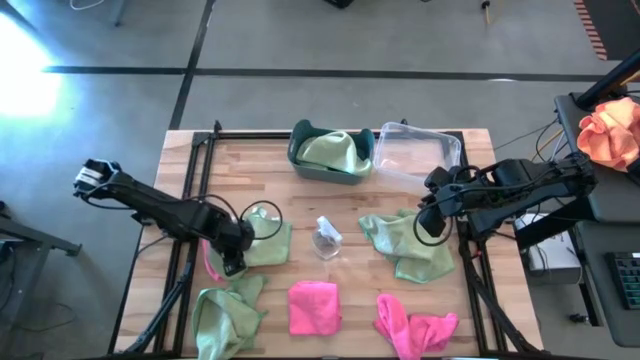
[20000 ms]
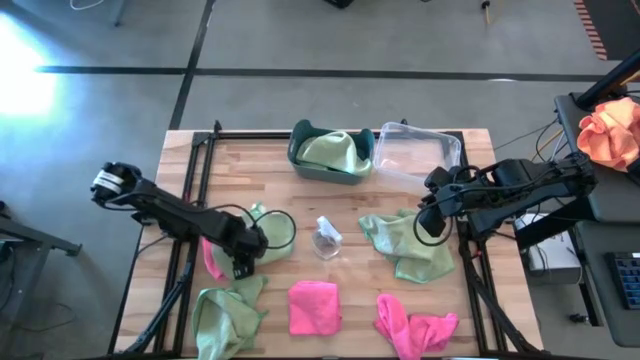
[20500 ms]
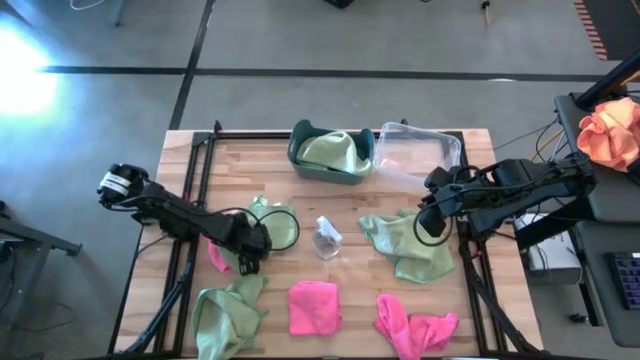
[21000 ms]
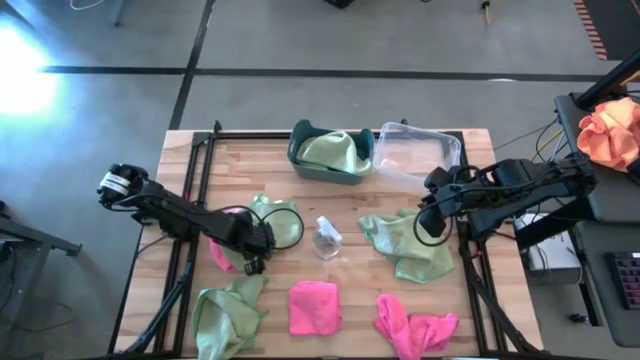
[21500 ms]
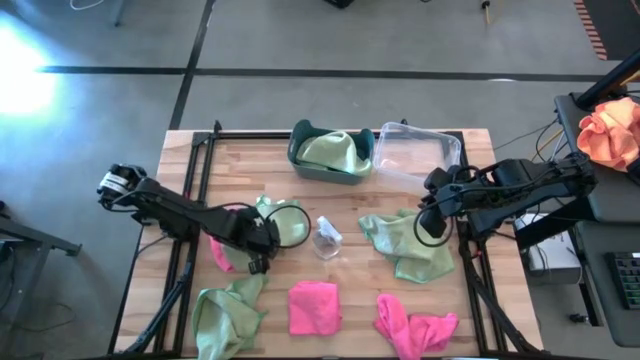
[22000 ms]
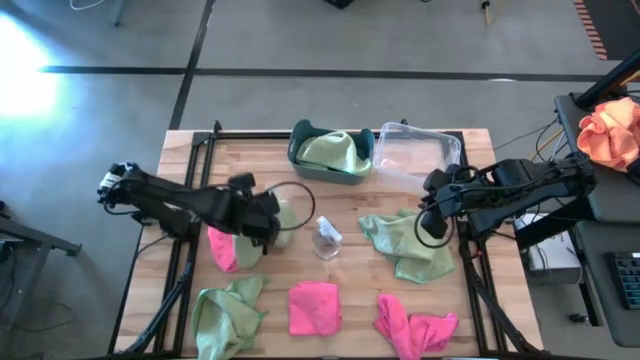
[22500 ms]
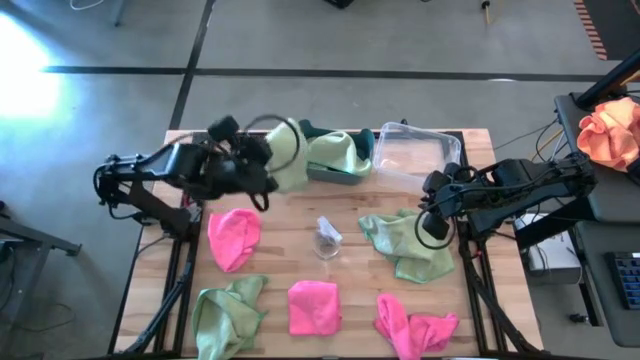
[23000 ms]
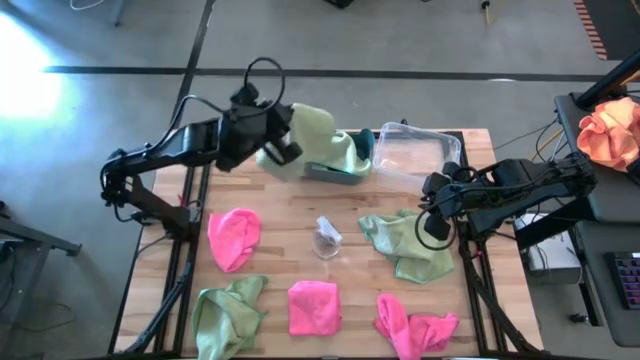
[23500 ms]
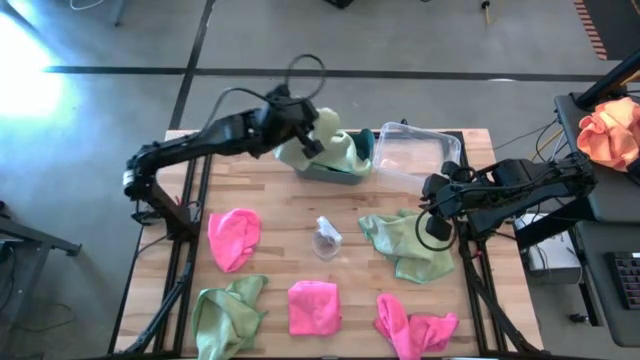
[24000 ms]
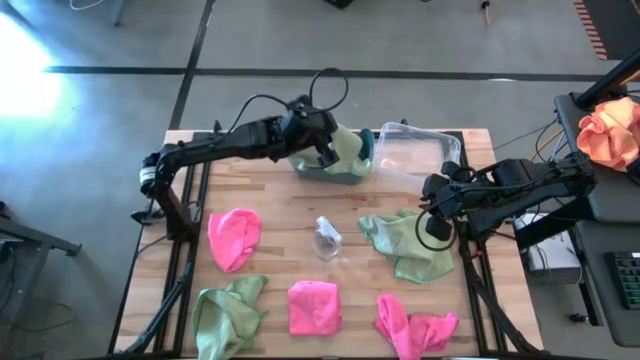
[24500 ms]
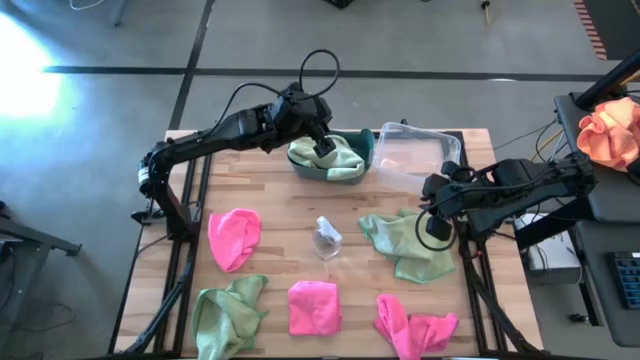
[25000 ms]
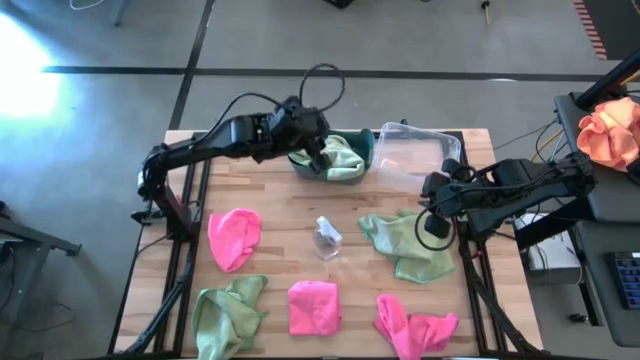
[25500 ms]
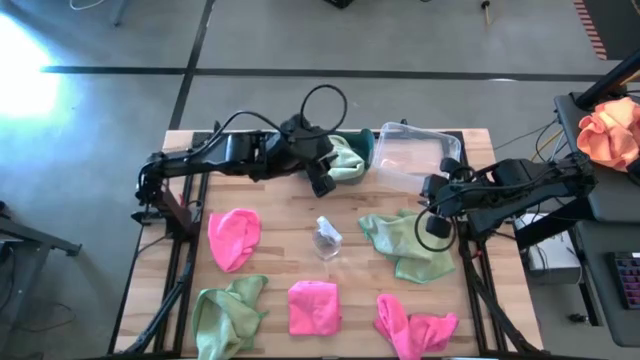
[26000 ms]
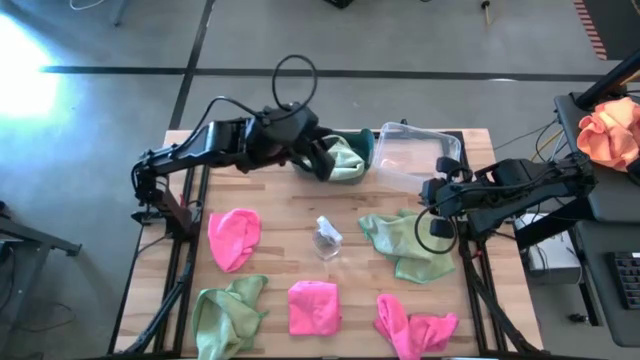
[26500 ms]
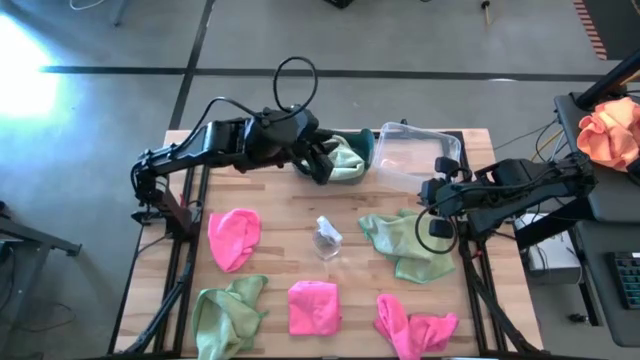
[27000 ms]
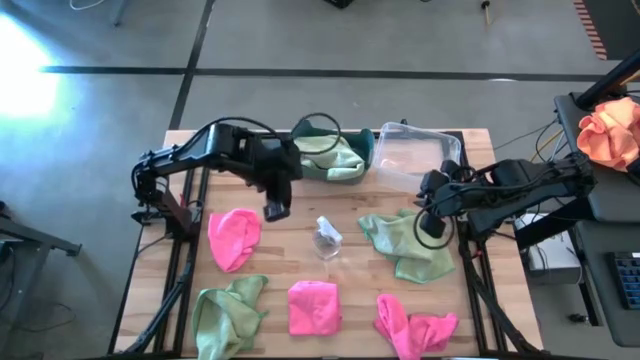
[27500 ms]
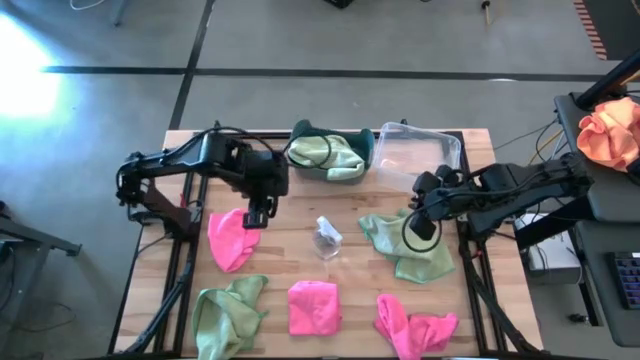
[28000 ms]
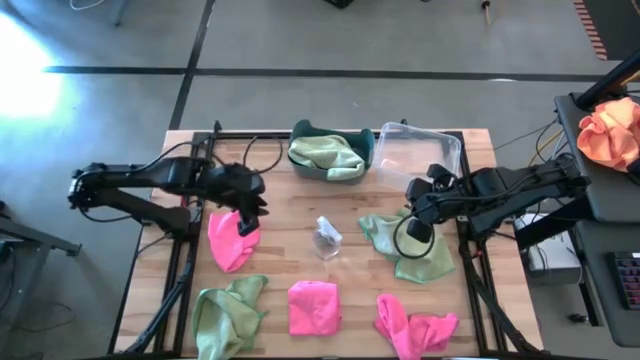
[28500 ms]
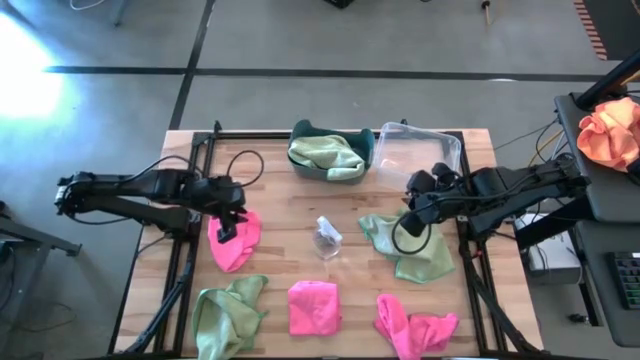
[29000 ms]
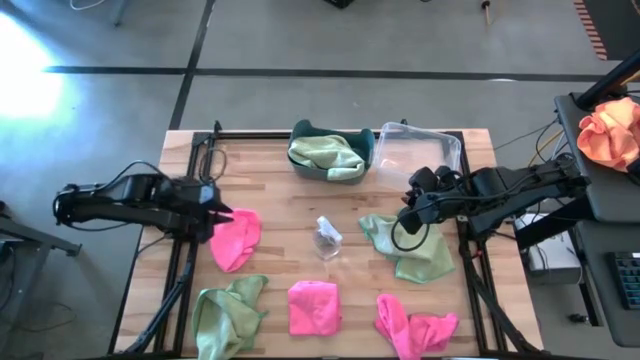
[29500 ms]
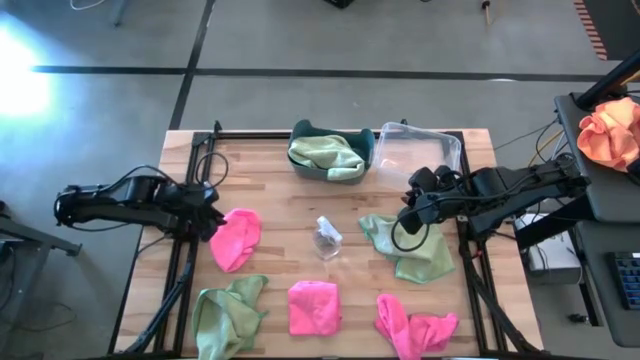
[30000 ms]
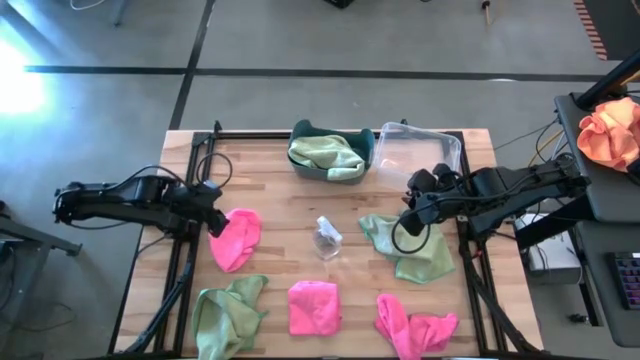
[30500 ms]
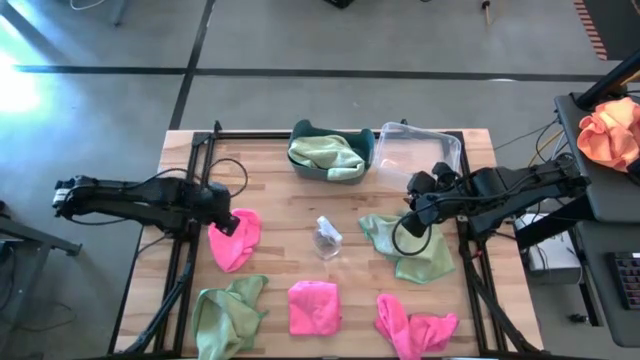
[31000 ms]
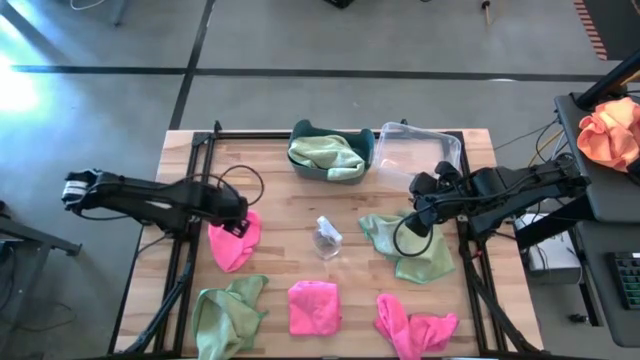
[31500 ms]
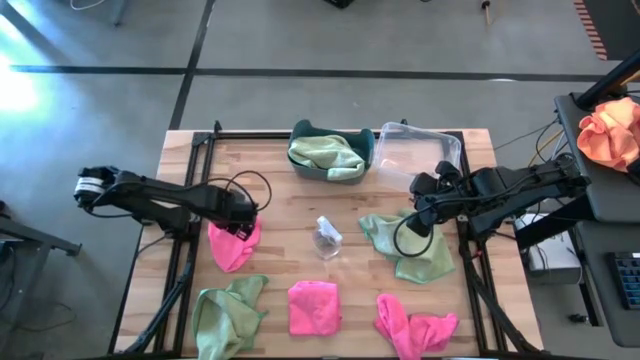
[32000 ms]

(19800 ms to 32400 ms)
Task: Sort microfiber towel by color & place in baskets
Put the top left green microfiber cloth into the blue bin

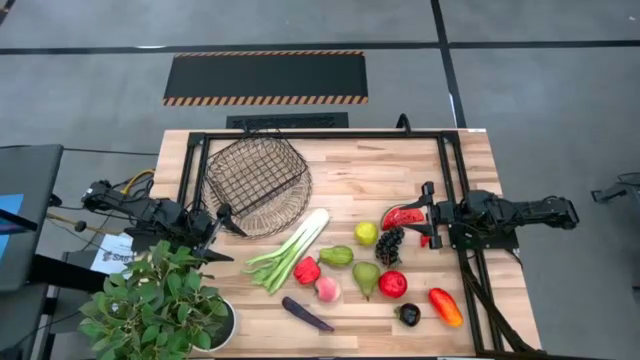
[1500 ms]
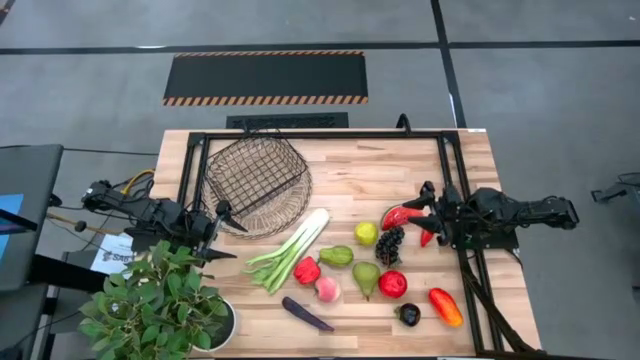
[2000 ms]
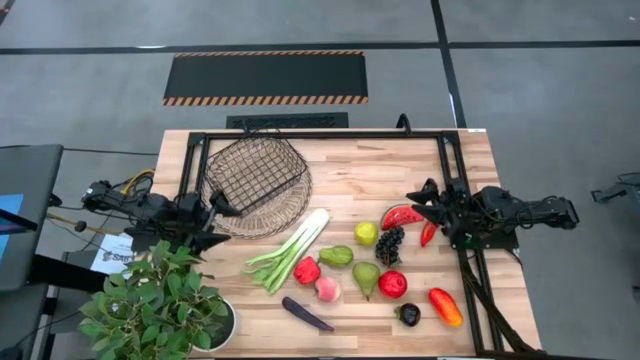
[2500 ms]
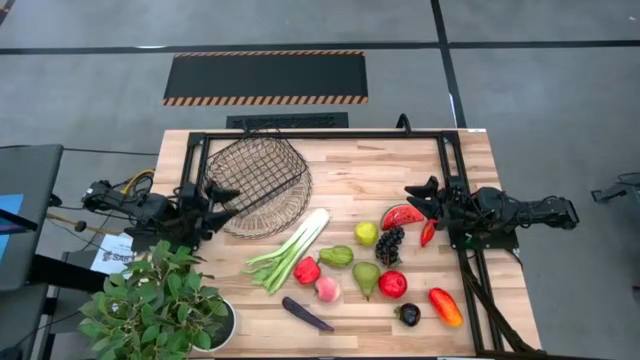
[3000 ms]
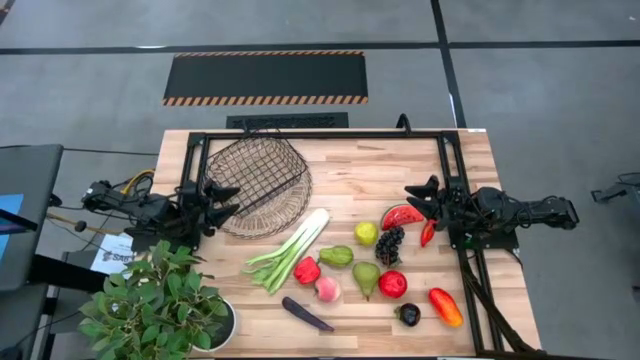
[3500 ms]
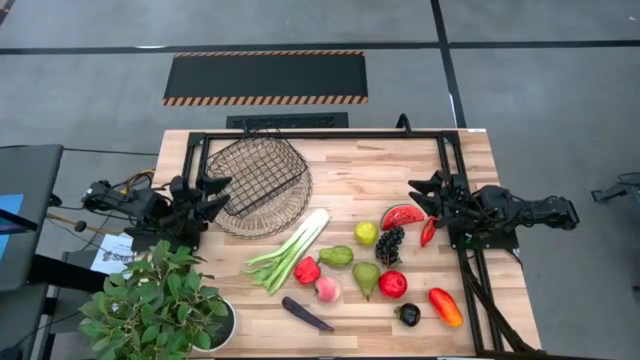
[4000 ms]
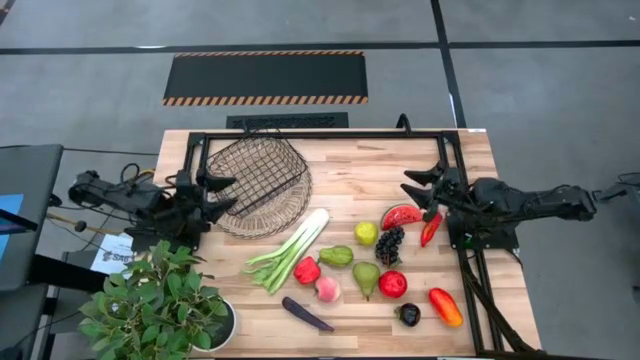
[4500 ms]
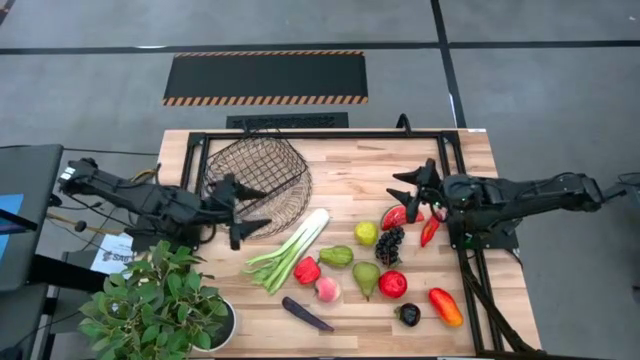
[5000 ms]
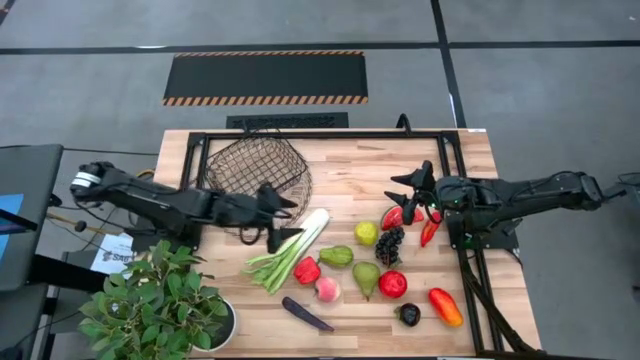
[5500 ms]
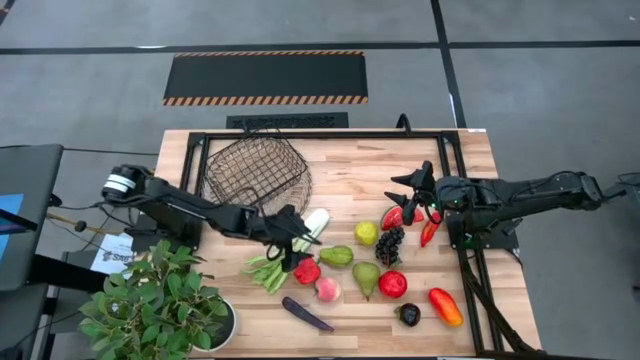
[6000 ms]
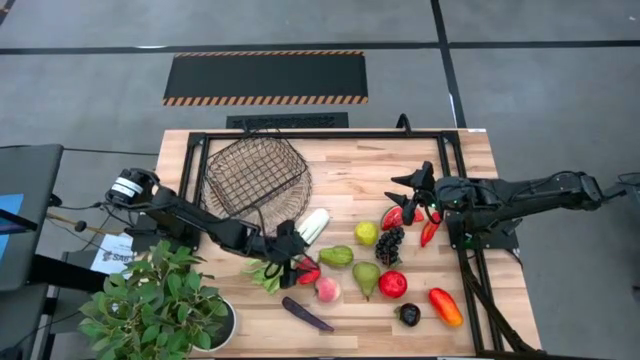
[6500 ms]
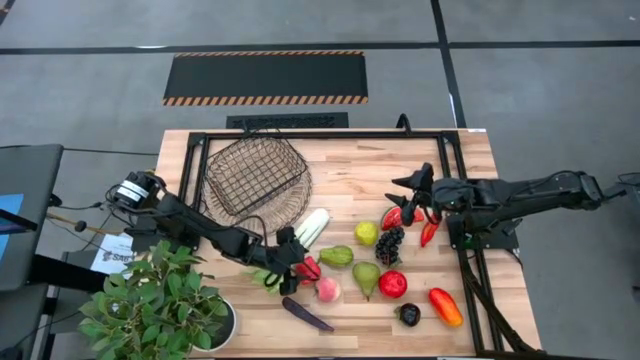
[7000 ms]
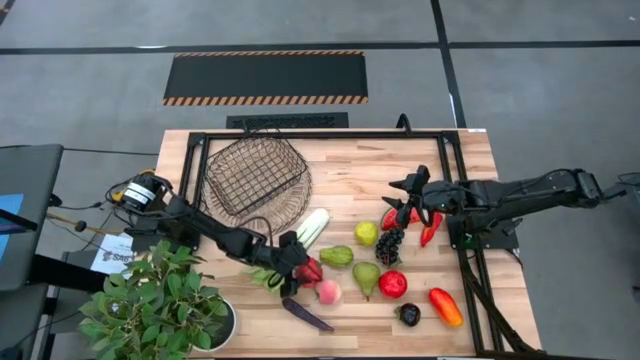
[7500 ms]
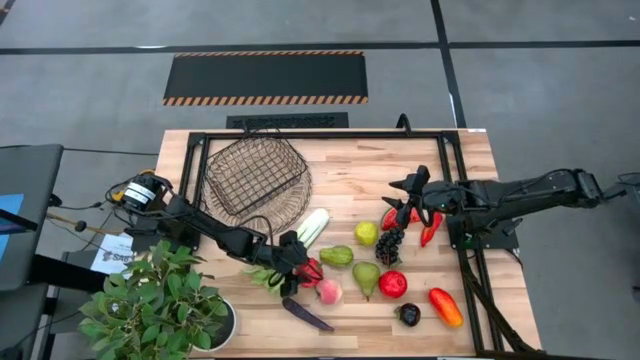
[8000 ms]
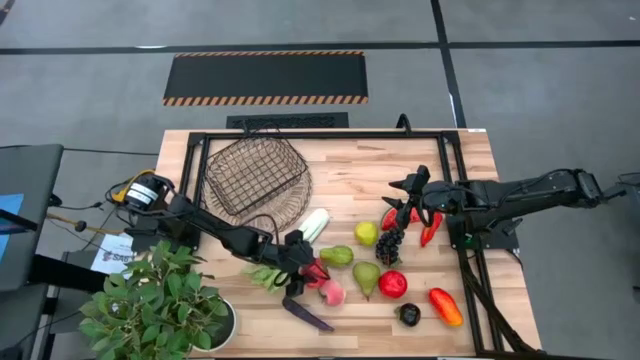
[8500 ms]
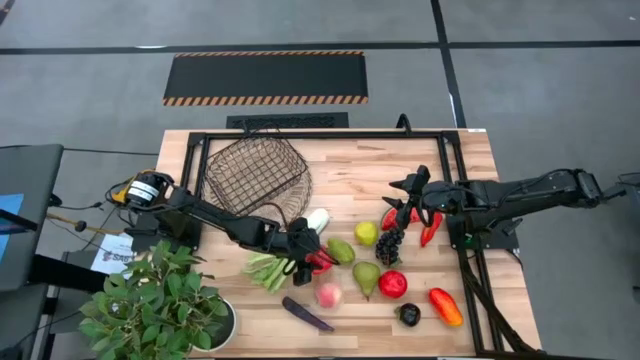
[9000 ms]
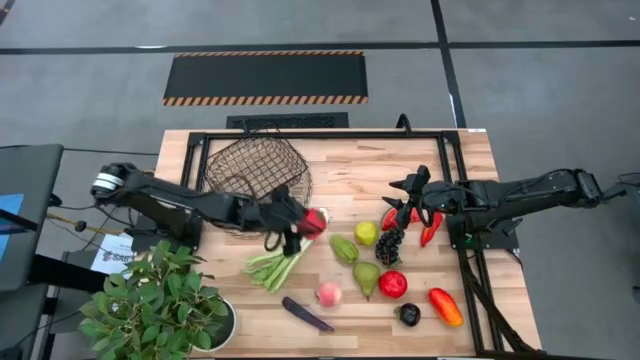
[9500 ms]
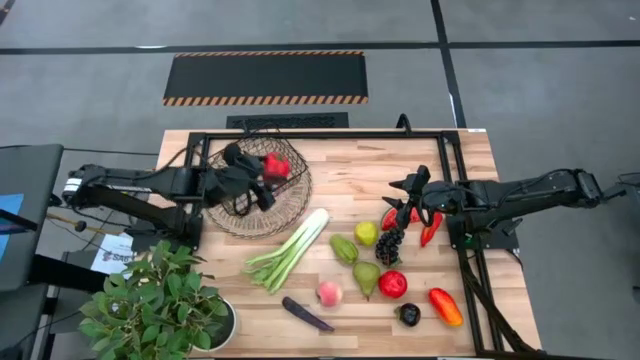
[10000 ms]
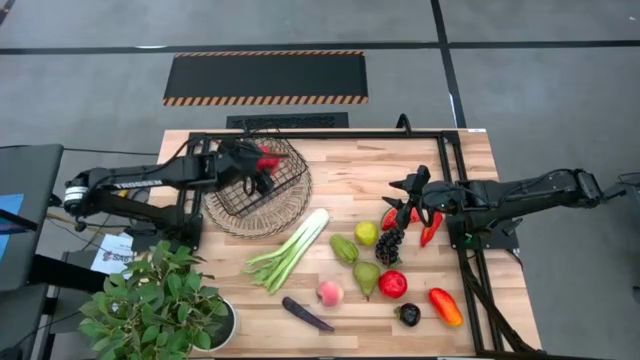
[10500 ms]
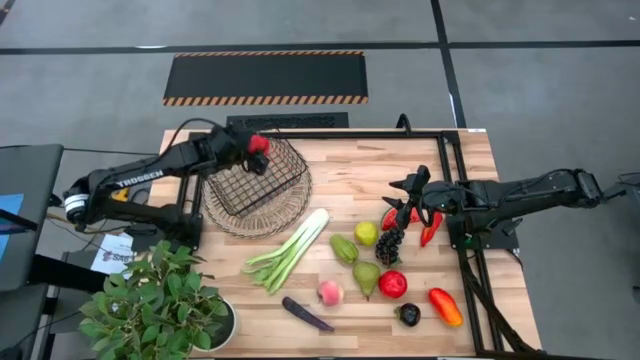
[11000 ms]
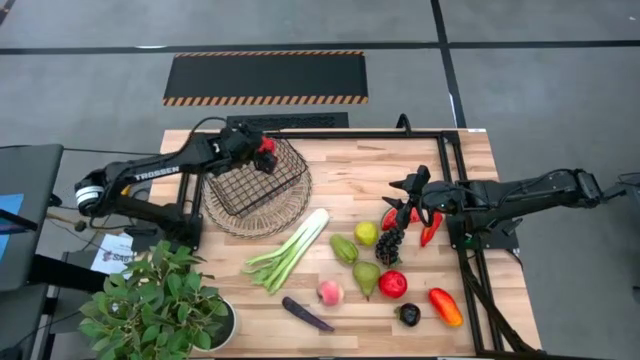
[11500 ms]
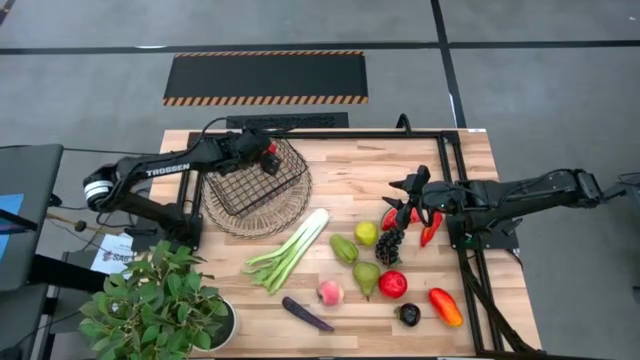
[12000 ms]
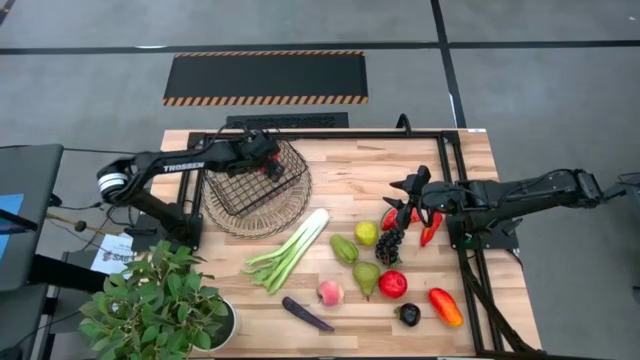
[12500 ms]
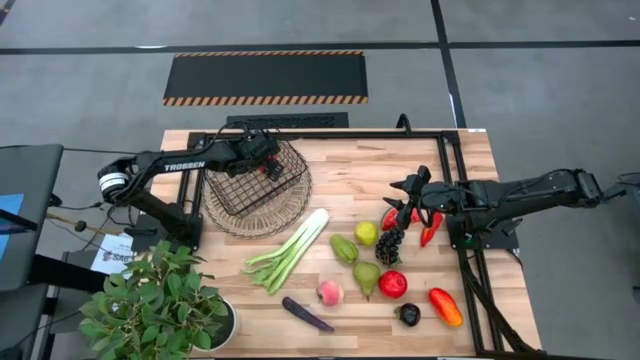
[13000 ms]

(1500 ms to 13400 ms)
Task: Build produce basket
Put the red bell pepper into the wire basket
